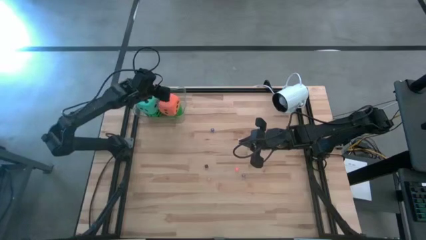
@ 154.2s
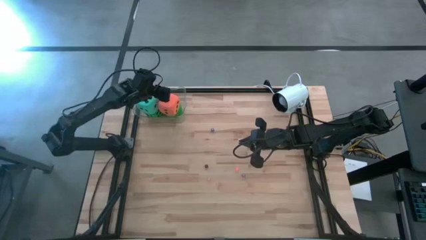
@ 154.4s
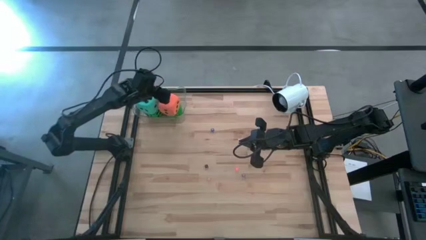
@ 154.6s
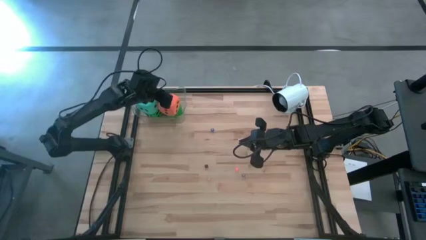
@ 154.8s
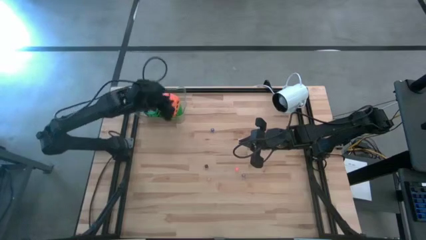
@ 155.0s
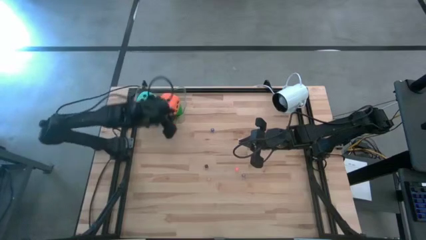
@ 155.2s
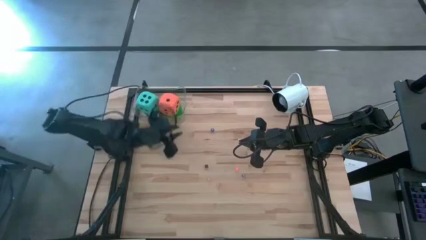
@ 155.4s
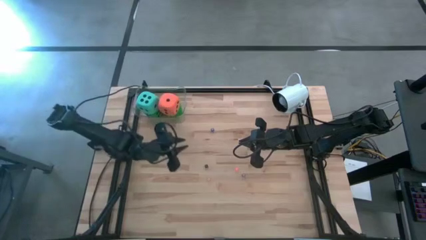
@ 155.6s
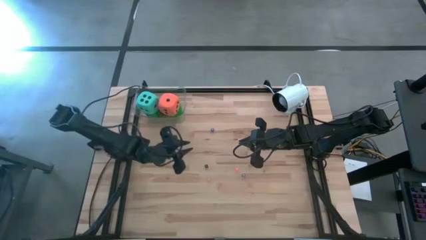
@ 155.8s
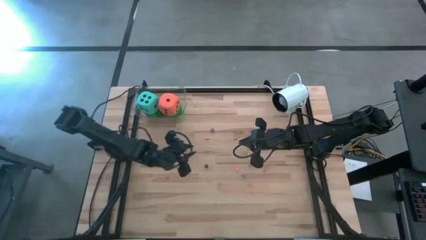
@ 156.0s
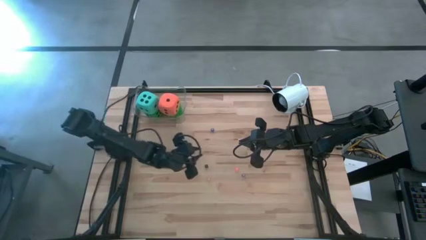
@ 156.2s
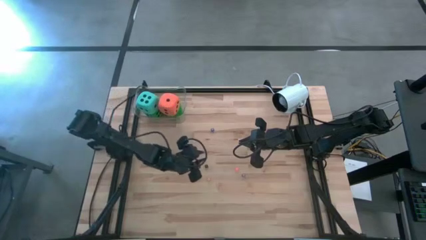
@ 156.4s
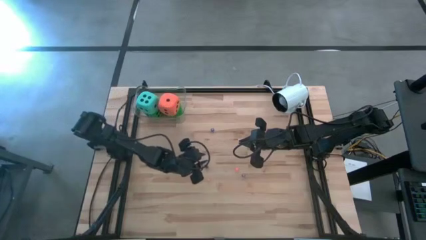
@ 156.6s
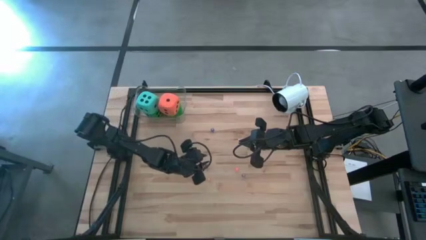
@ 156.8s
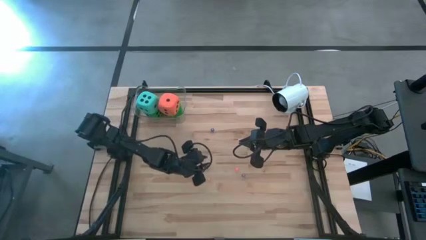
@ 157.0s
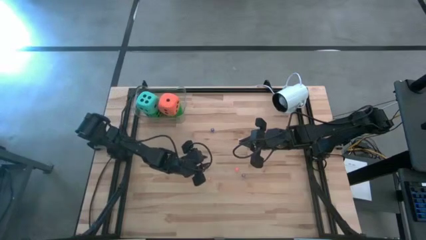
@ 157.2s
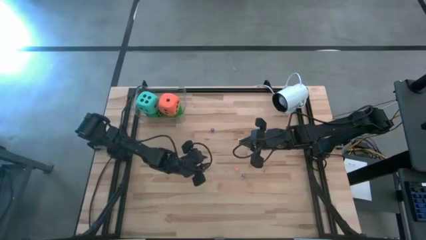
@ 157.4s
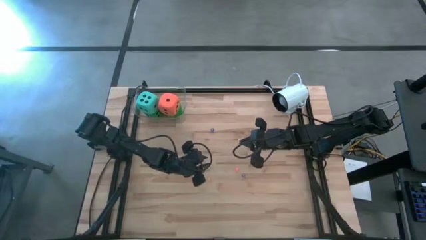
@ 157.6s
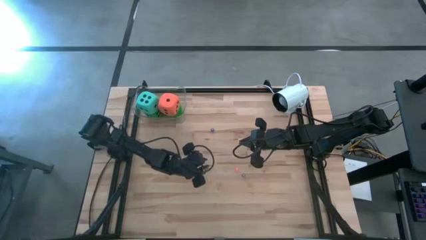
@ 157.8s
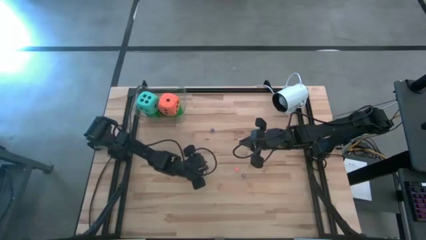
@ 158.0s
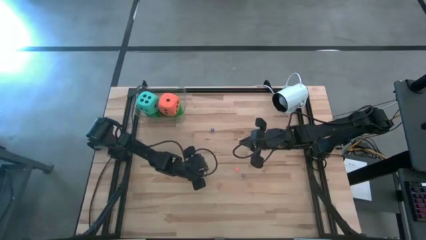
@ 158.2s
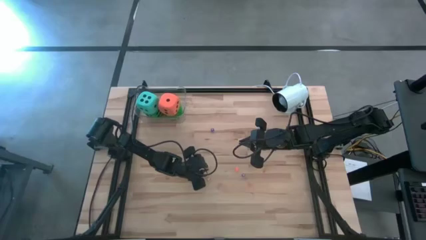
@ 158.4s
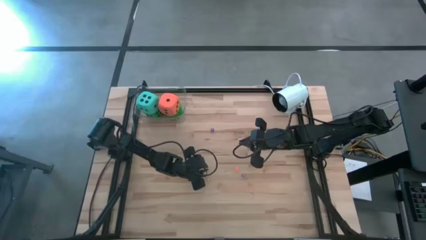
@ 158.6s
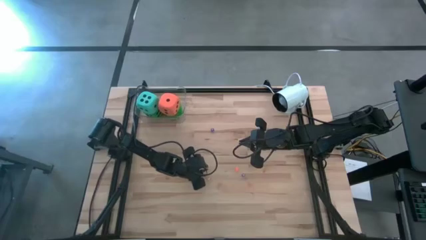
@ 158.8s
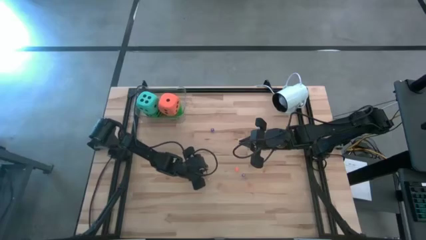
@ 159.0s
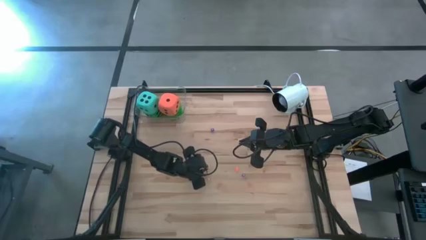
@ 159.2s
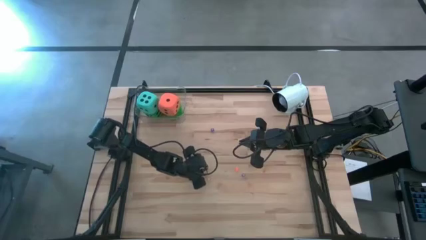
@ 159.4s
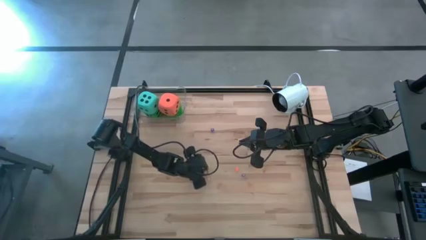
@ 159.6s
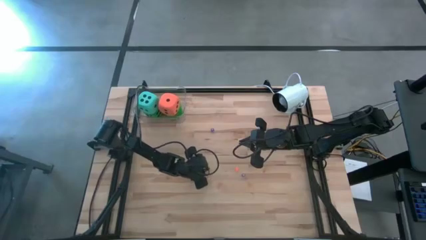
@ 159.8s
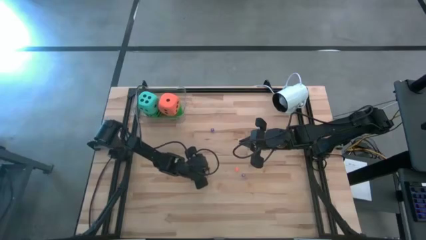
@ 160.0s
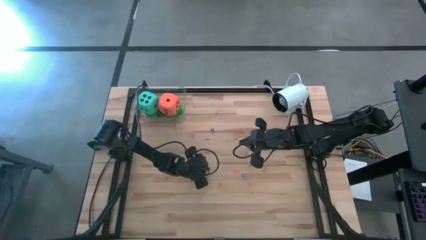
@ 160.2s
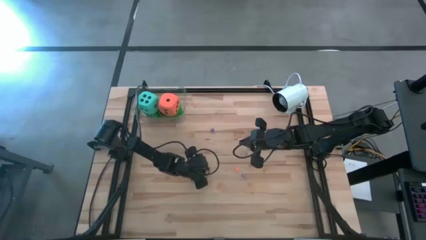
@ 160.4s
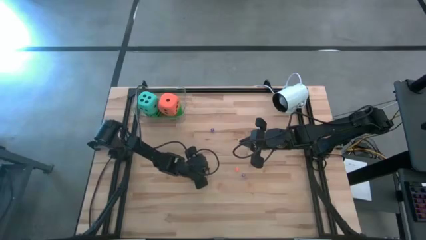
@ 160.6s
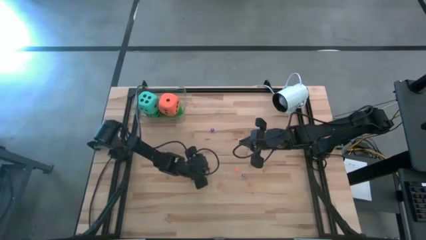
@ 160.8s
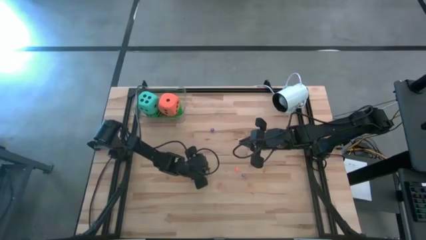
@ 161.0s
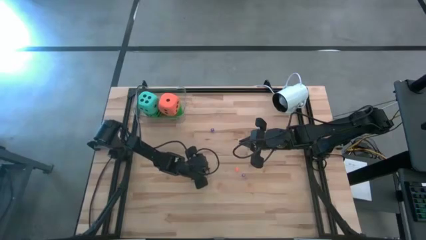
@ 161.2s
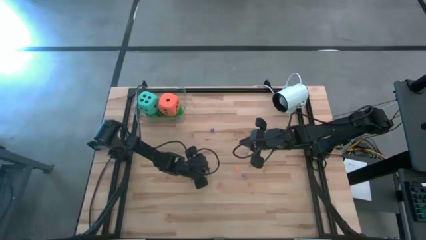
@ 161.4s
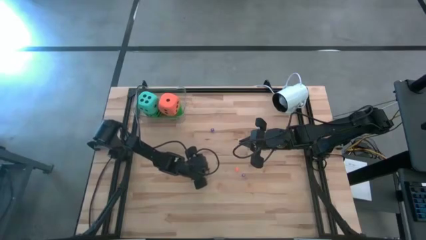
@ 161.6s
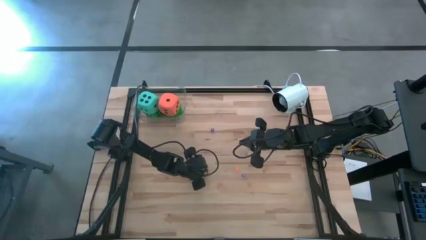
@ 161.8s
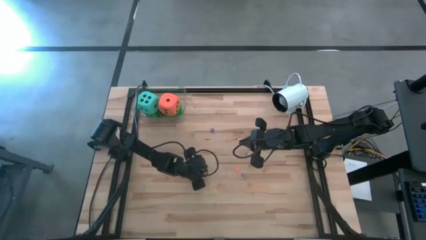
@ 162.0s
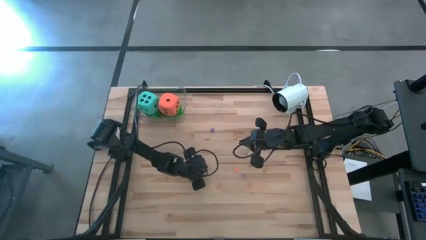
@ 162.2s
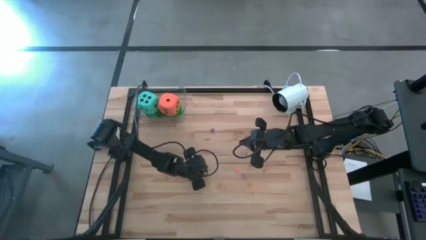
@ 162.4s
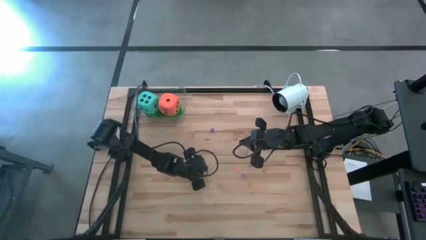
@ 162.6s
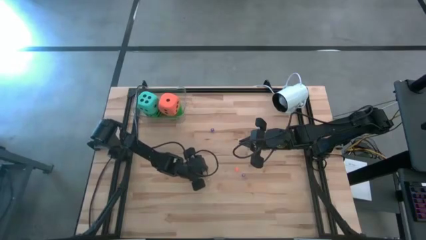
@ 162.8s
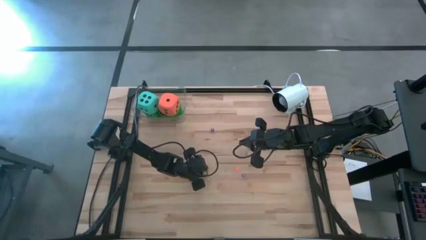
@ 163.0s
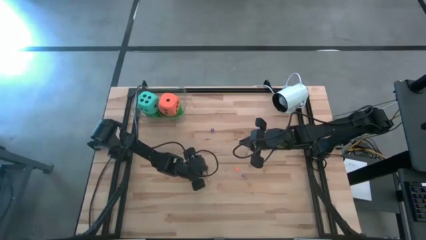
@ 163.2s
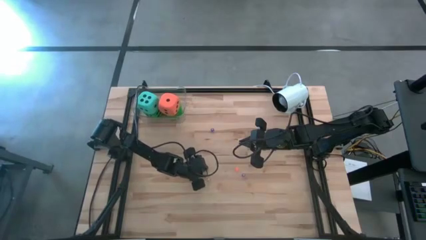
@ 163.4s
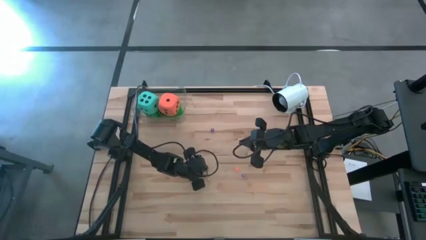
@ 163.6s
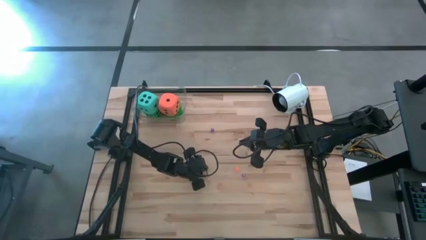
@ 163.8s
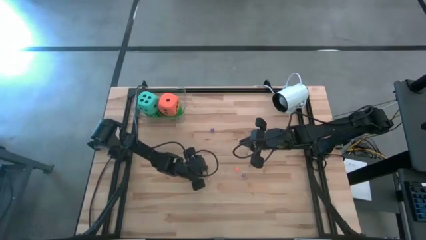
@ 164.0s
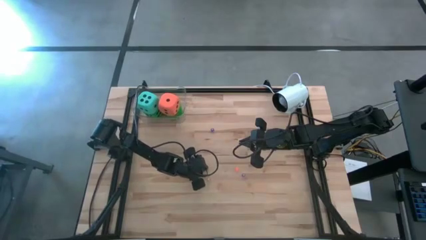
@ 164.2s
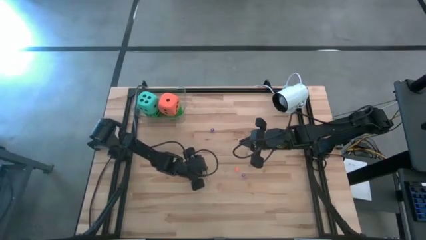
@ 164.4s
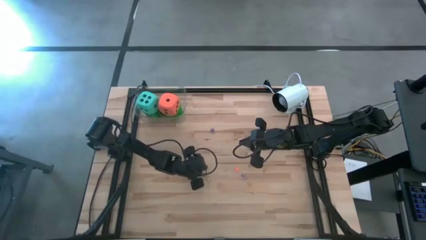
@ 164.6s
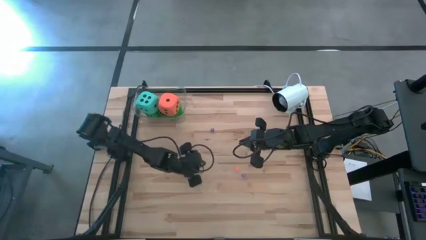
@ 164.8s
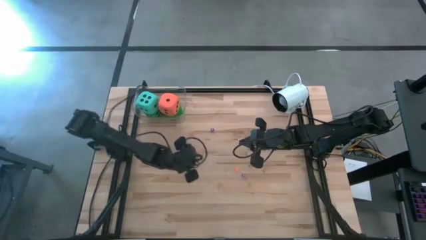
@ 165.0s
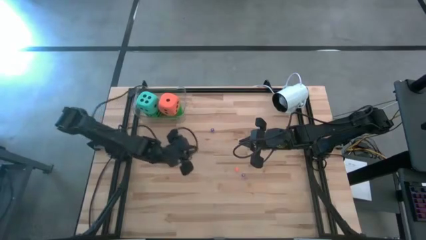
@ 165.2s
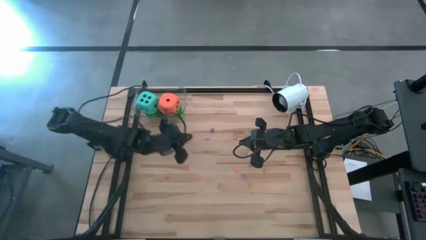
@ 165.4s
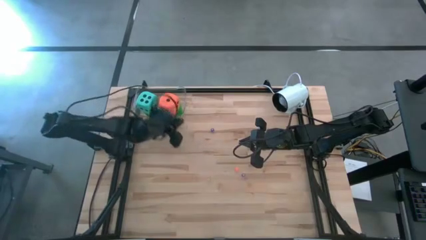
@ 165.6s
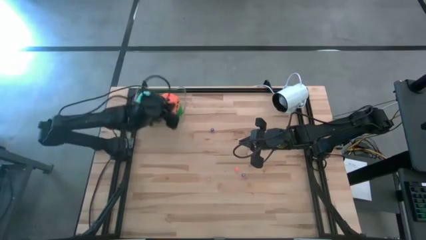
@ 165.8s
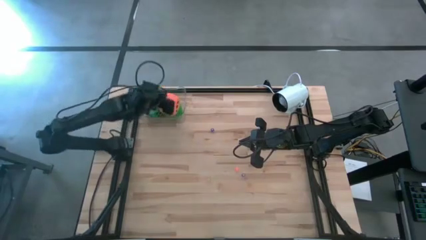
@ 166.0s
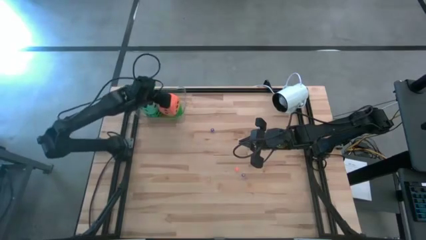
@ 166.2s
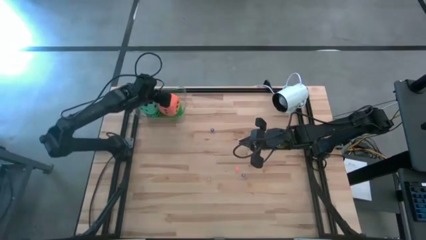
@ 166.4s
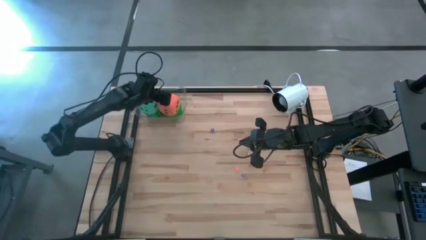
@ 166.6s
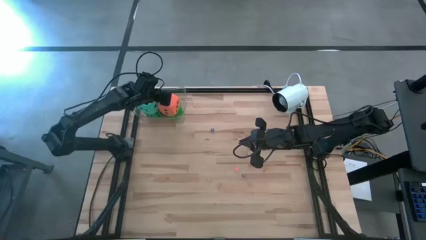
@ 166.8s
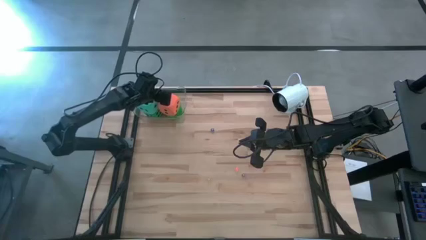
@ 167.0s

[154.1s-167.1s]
Task: Pick & Place Dice
Put the small black die into the transparent bin

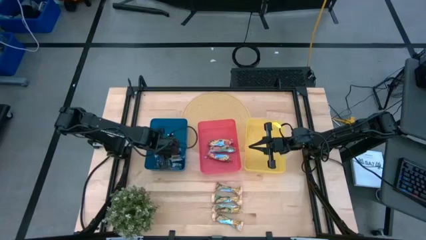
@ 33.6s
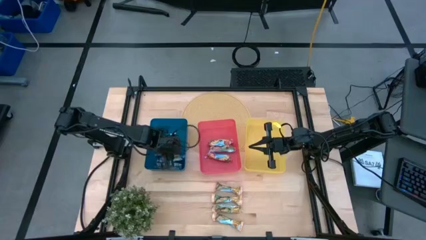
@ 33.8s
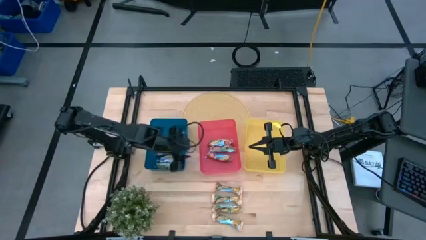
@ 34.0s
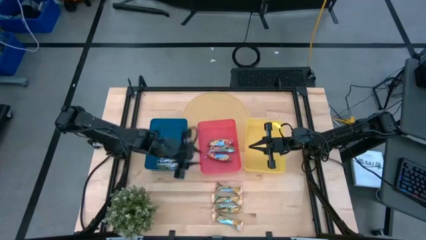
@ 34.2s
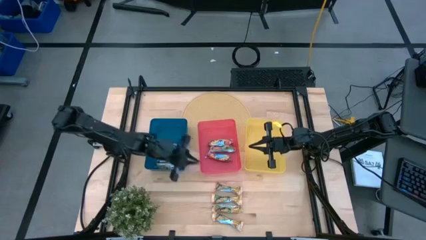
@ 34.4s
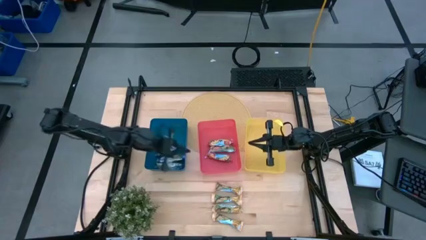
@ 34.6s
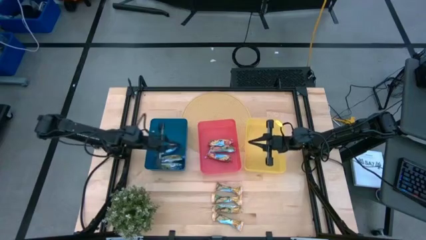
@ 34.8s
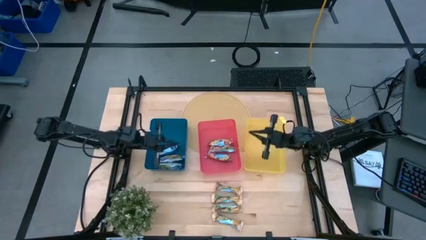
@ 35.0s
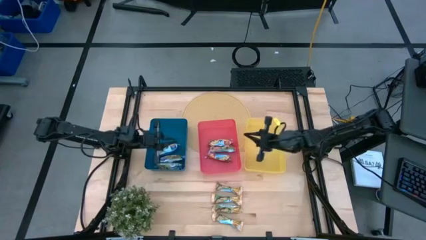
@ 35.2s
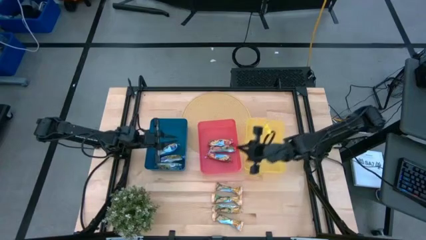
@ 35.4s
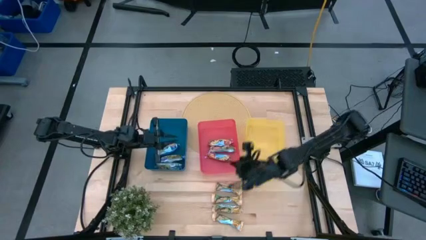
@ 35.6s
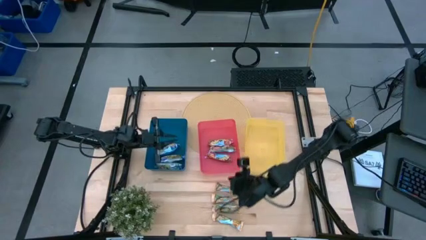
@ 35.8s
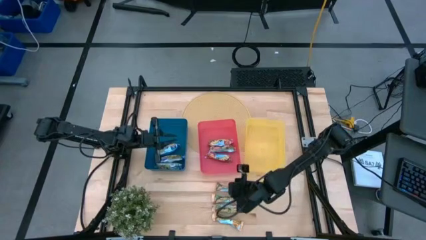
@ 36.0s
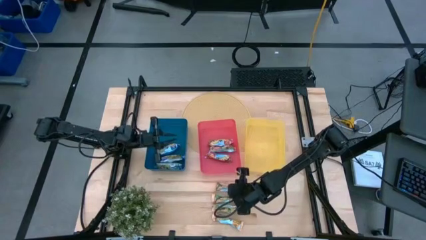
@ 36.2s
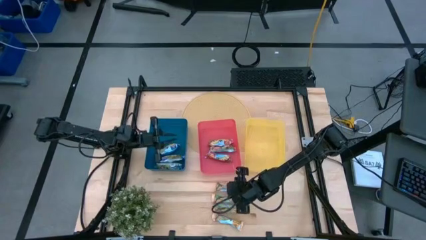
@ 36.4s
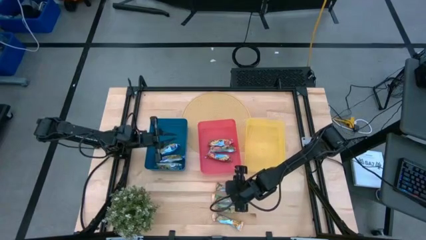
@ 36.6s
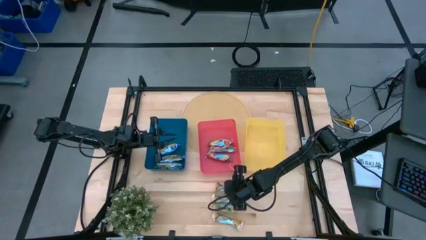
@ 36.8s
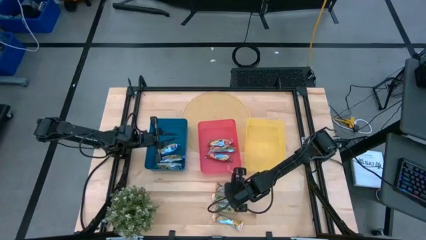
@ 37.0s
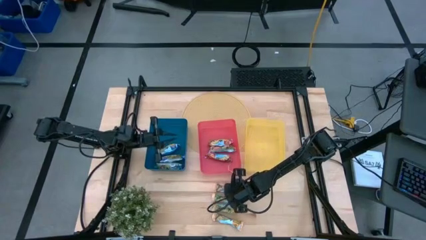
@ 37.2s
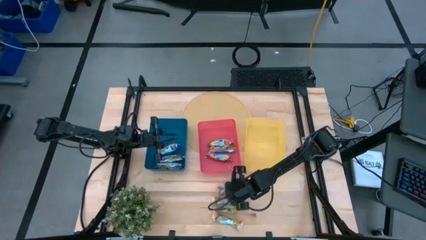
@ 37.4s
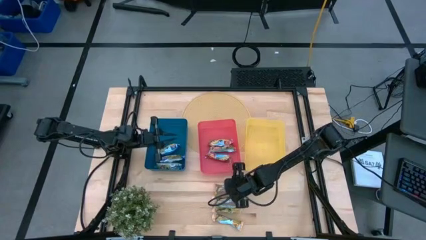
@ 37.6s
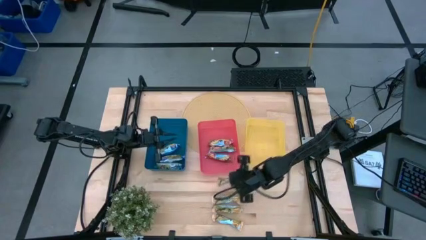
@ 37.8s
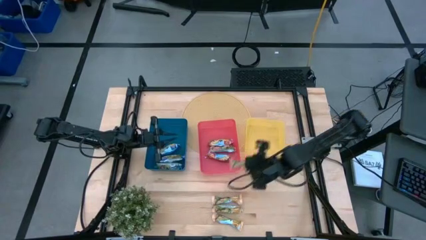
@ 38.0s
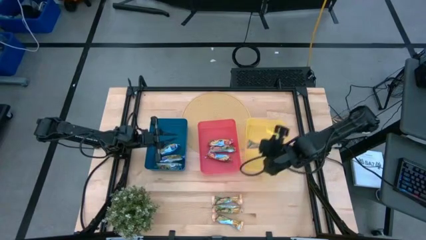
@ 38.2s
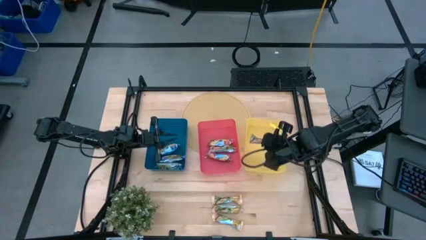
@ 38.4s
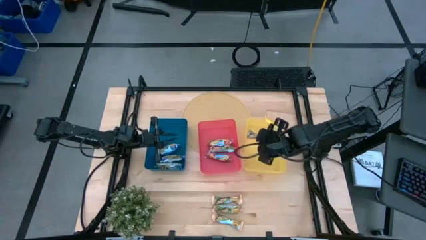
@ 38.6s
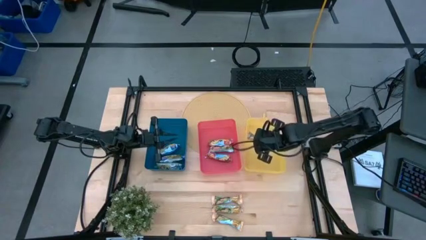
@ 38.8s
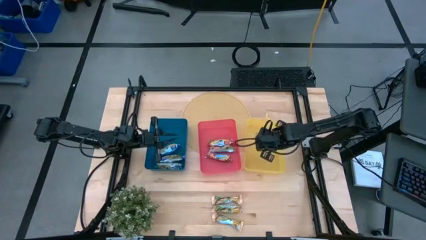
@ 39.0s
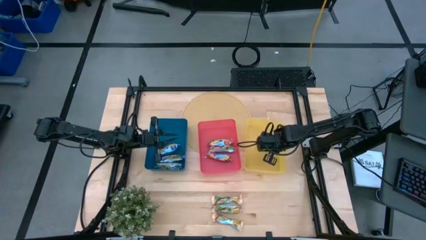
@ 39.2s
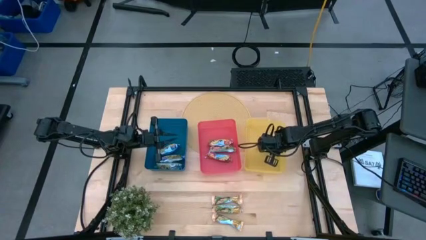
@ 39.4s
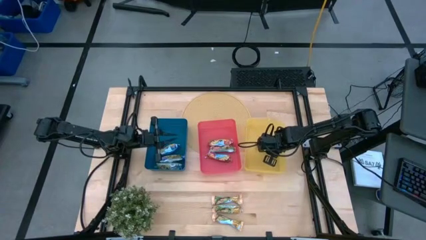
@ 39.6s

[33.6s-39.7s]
Task: Pick and place Granola Bars by type
Put the yellow granola bar into the yellow bin
